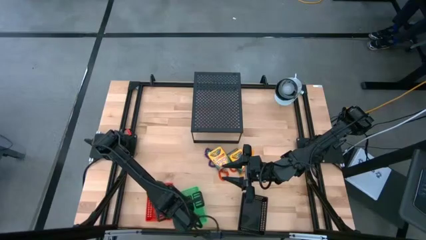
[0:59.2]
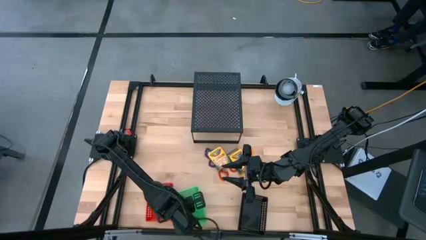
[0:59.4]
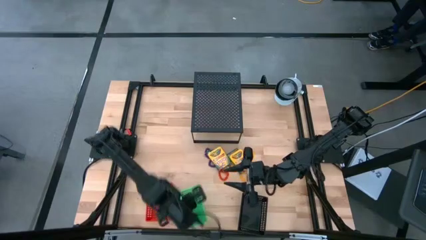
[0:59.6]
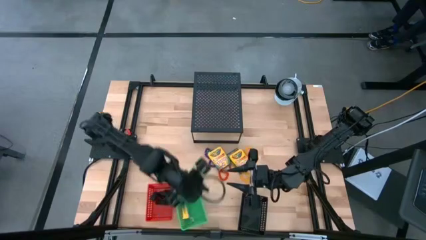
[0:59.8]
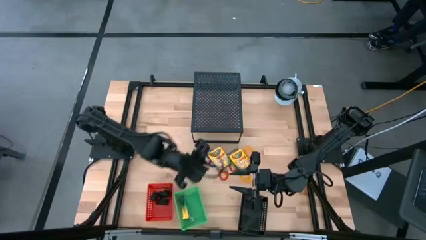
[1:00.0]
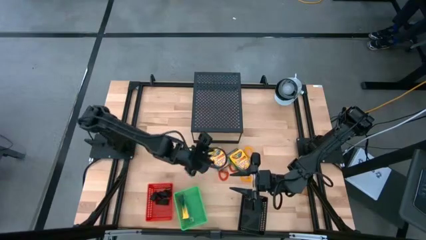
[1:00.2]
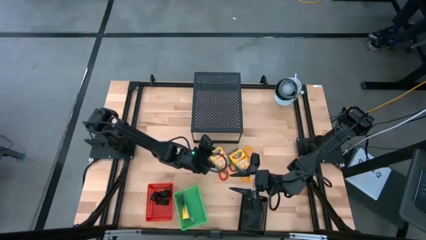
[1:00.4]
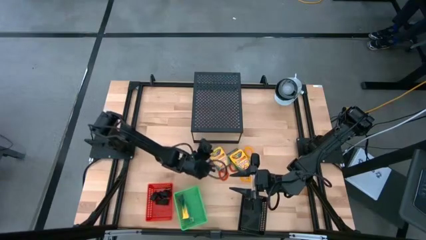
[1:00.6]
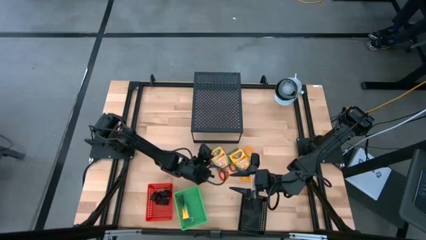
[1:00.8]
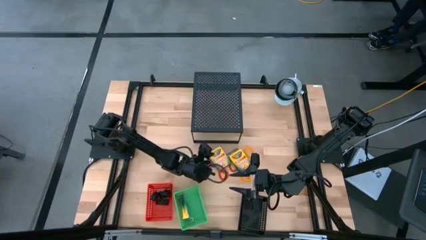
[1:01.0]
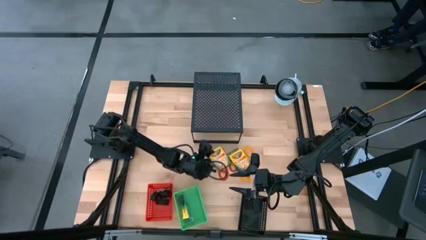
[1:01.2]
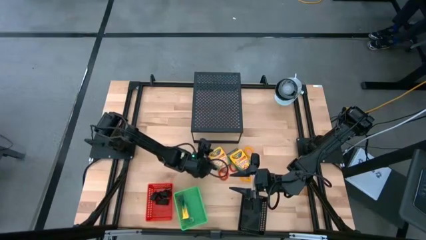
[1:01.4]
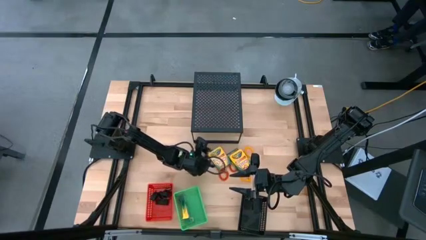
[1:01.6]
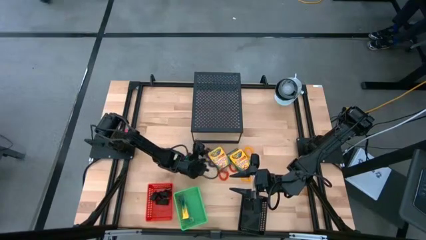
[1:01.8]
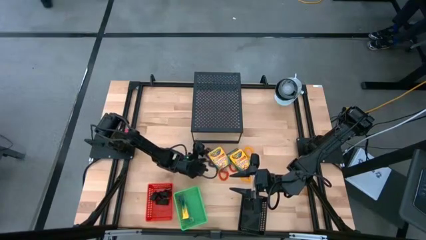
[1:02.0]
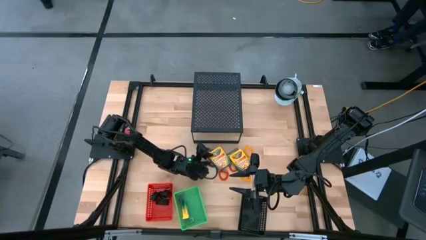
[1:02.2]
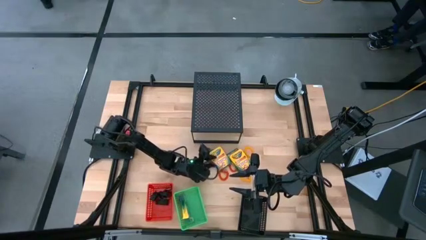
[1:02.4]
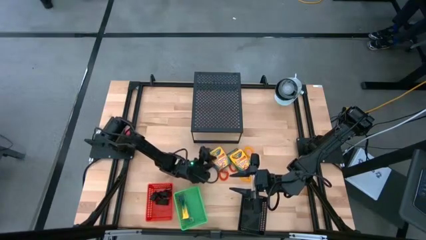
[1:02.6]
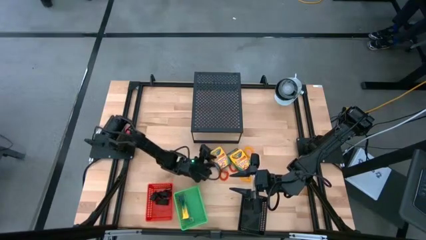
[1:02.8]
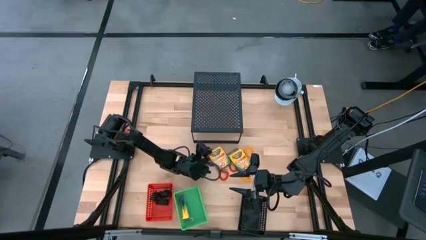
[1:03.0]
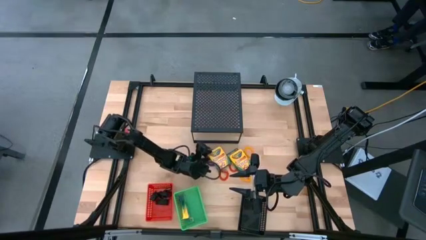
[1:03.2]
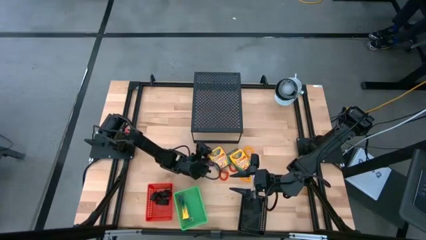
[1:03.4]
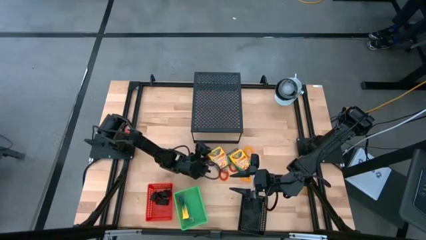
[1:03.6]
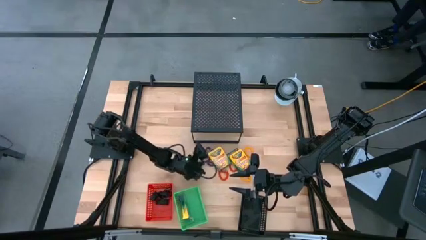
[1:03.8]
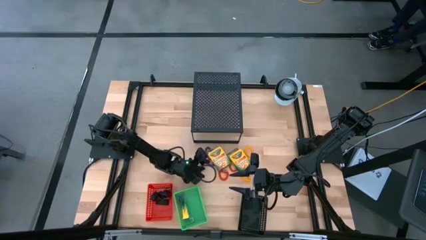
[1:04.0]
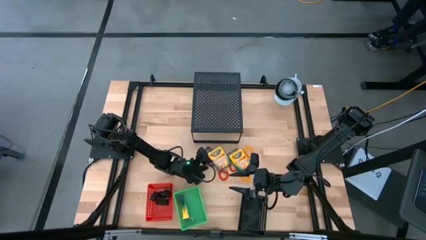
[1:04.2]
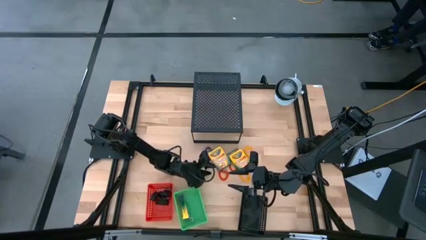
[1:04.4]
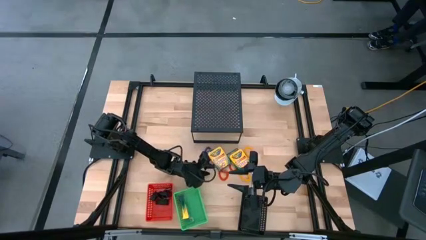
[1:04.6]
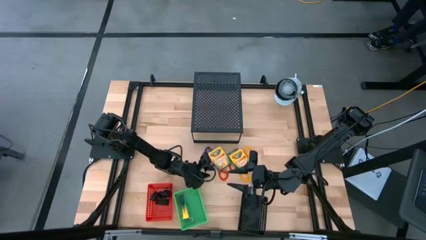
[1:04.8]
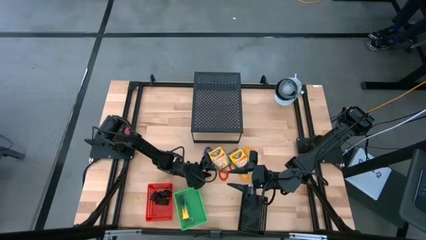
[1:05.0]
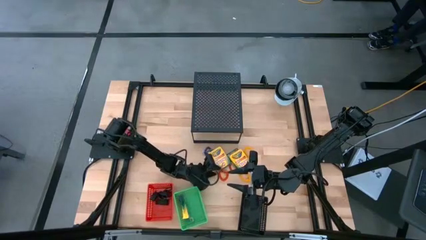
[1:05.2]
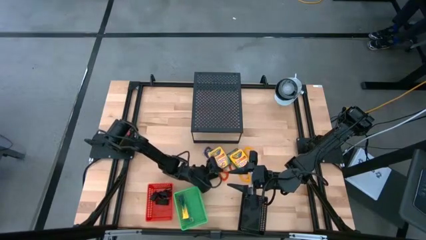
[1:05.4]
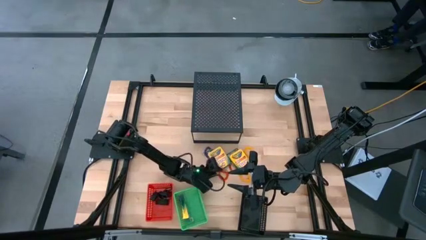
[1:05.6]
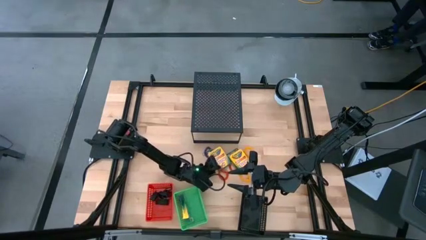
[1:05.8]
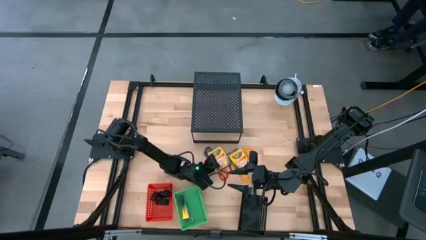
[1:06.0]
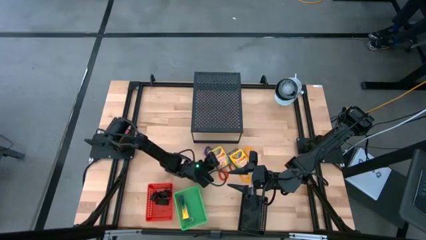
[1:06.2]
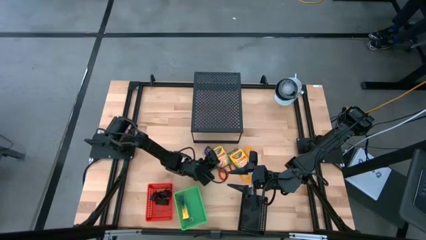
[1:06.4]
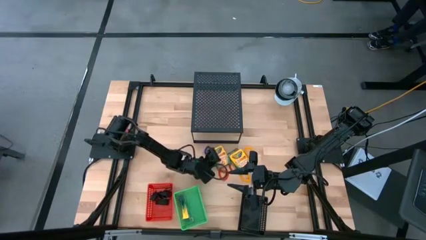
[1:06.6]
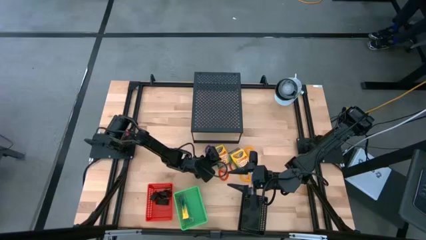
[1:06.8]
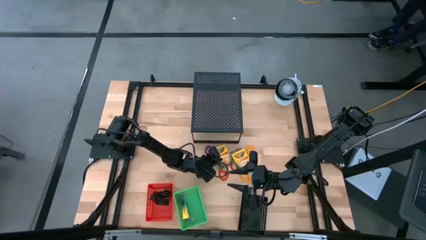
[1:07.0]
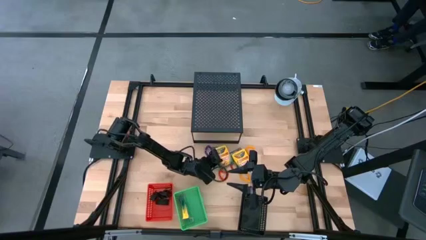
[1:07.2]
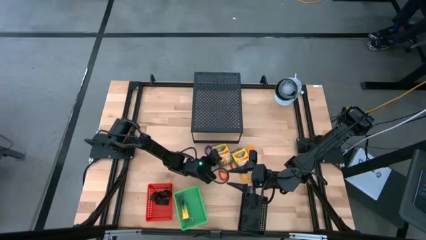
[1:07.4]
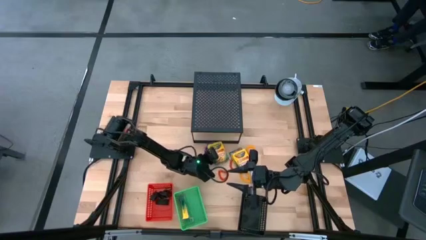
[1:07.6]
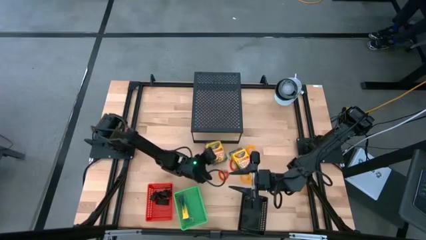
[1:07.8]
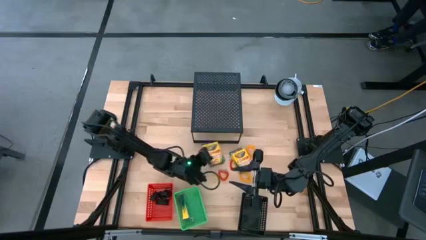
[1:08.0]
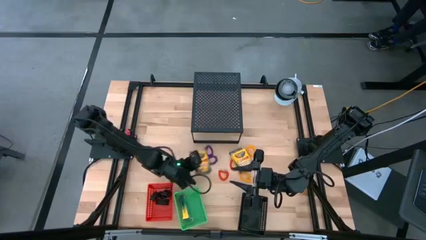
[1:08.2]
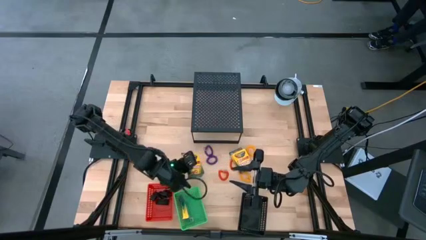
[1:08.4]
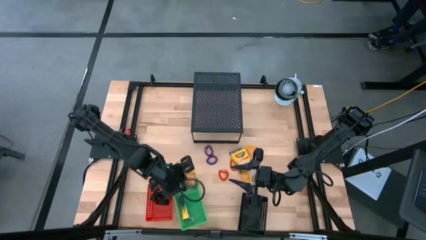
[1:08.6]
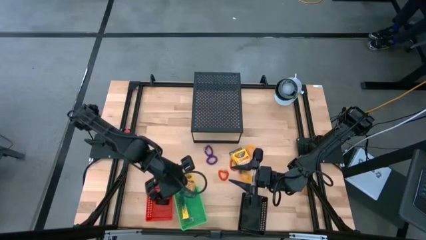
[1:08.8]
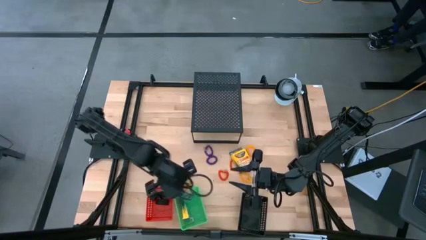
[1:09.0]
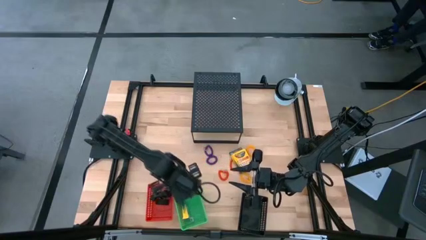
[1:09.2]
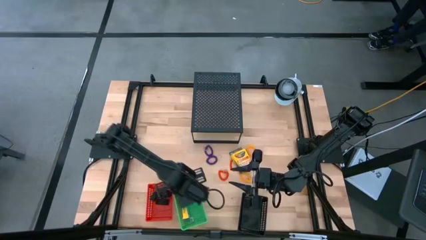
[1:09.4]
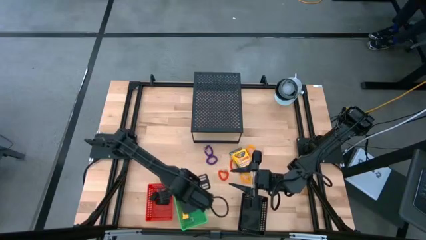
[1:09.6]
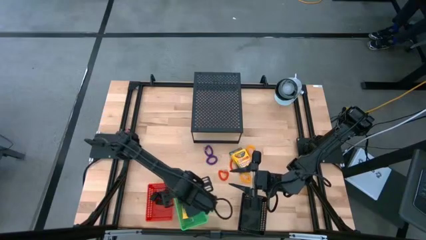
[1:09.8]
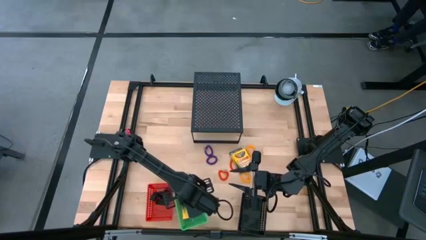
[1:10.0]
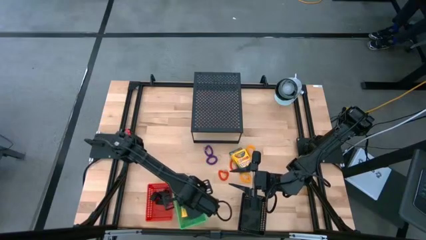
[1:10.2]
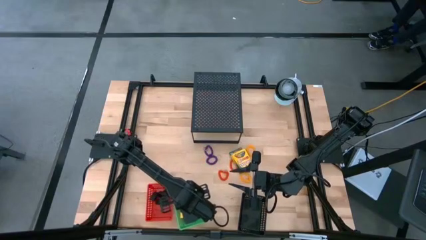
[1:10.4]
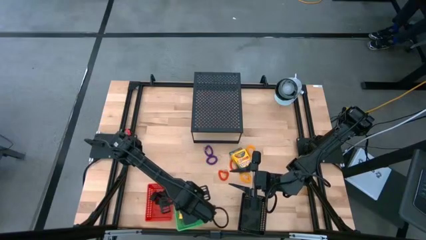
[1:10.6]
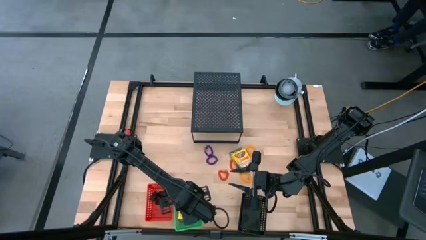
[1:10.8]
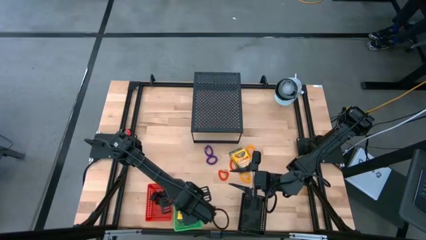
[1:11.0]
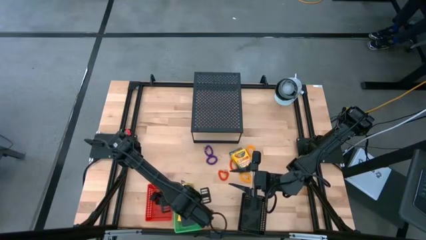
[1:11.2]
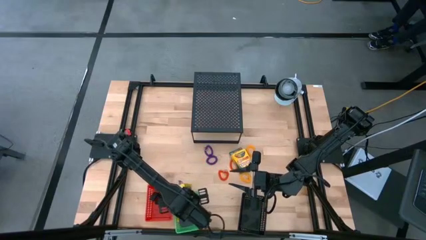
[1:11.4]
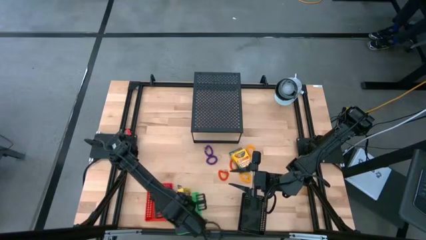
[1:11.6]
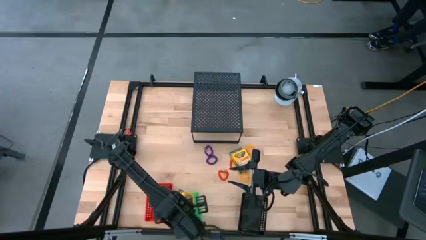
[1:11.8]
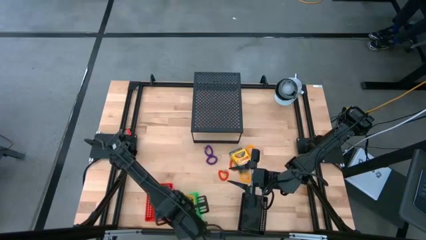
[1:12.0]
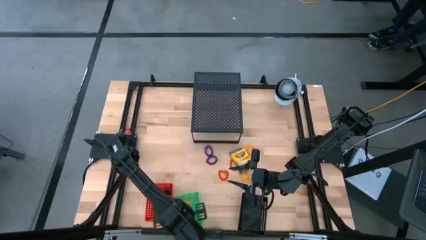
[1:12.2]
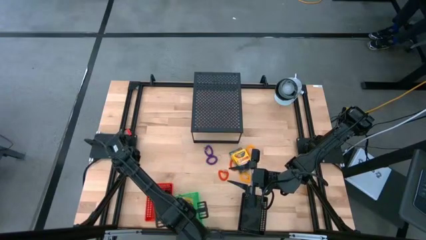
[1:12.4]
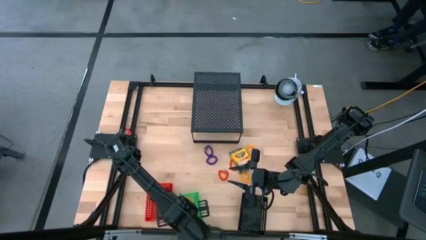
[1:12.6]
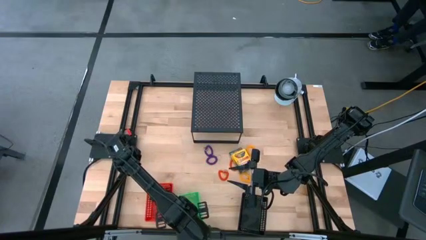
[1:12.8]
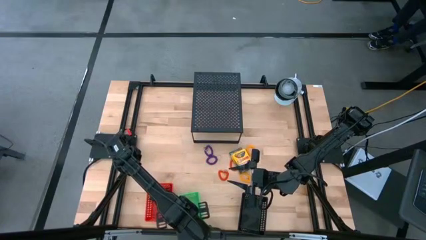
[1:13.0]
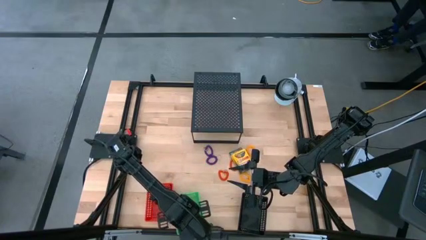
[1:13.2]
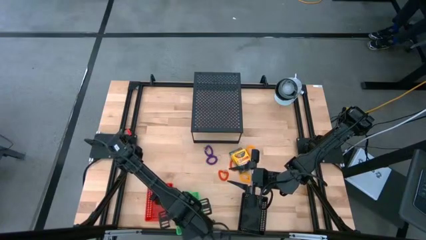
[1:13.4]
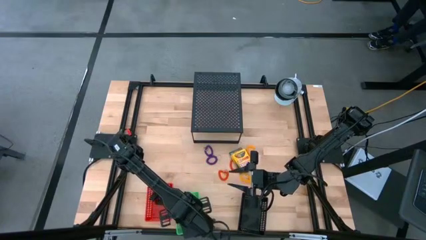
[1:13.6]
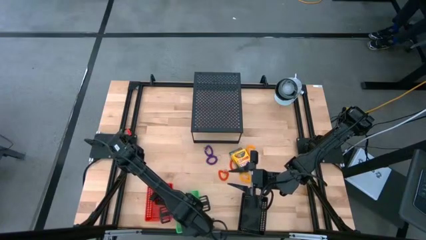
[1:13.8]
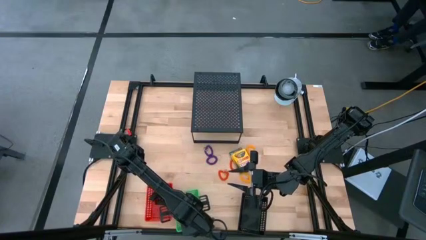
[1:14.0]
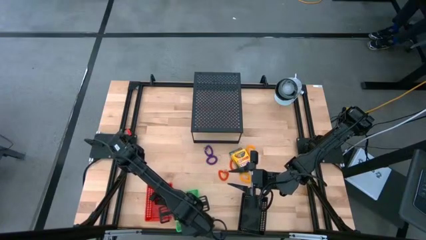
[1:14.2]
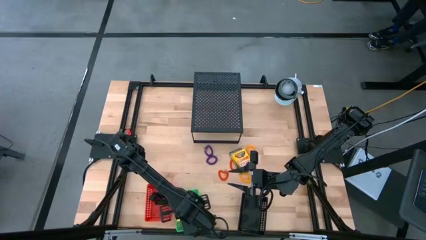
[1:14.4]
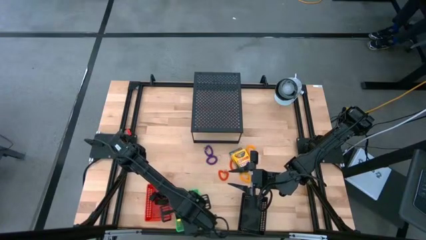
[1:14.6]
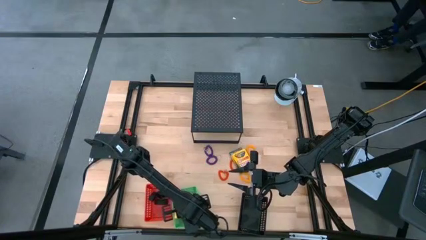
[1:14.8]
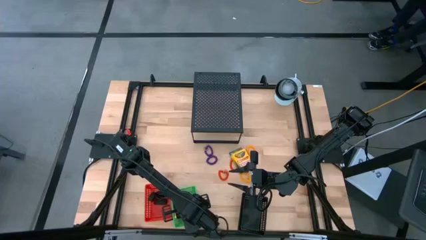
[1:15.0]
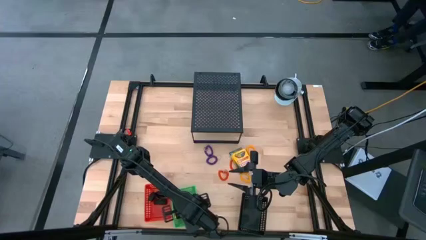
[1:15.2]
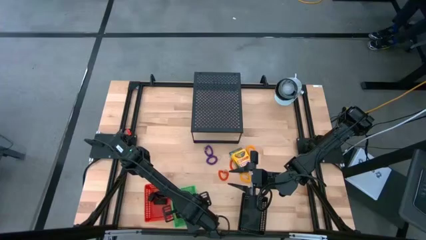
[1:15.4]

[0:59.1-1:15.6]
Task: Pick & Place Office Desk Supplies
Put the crayon box into the green bin
